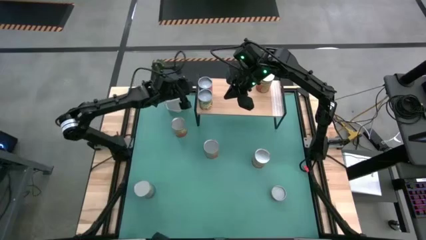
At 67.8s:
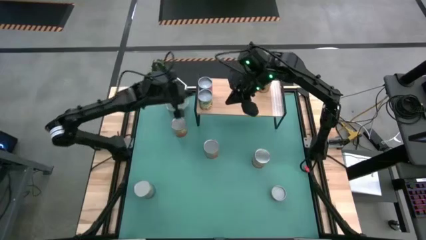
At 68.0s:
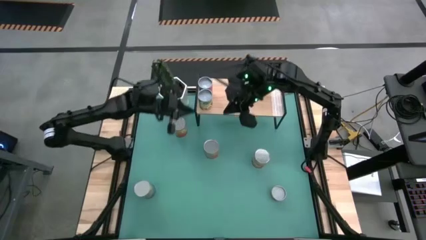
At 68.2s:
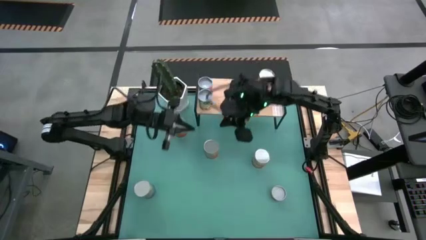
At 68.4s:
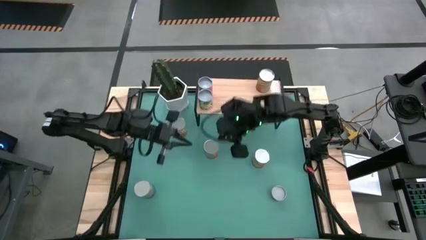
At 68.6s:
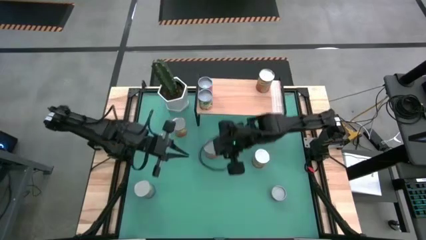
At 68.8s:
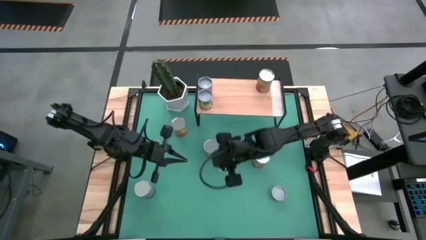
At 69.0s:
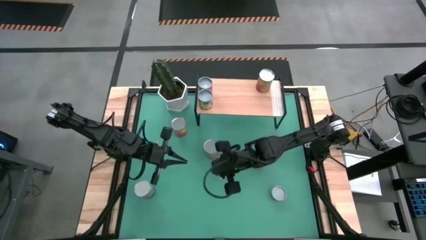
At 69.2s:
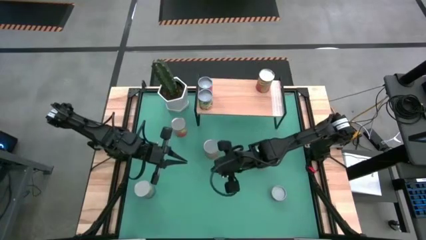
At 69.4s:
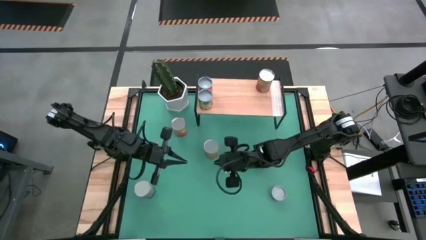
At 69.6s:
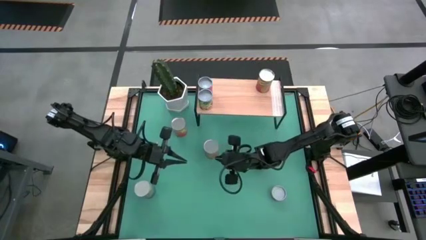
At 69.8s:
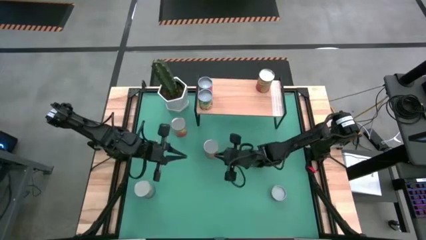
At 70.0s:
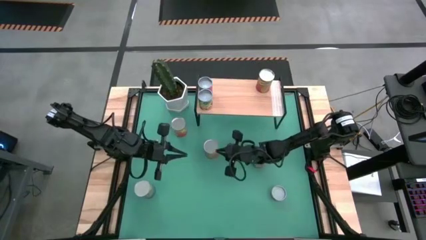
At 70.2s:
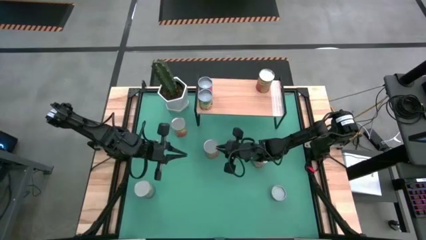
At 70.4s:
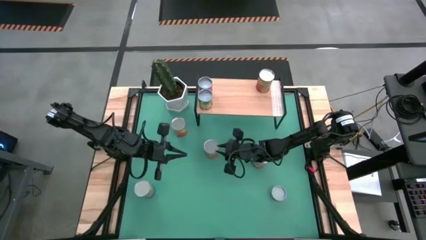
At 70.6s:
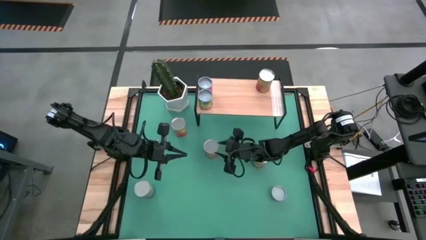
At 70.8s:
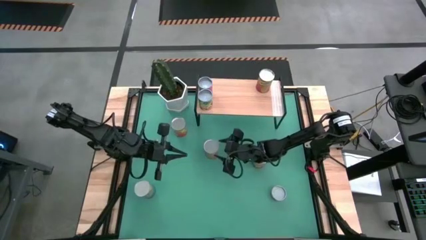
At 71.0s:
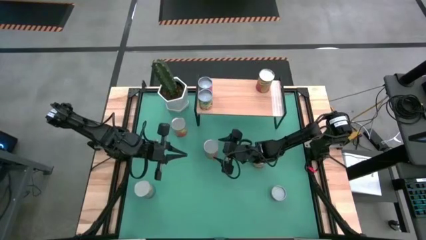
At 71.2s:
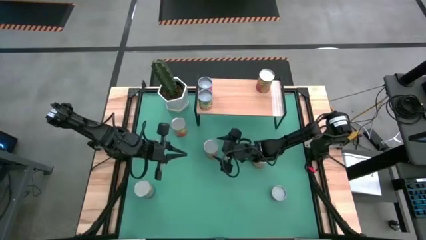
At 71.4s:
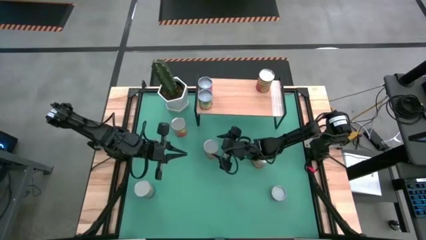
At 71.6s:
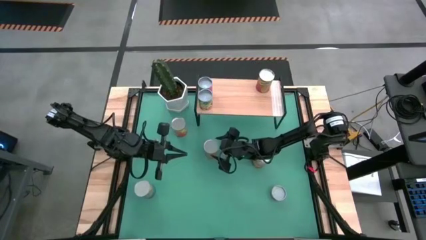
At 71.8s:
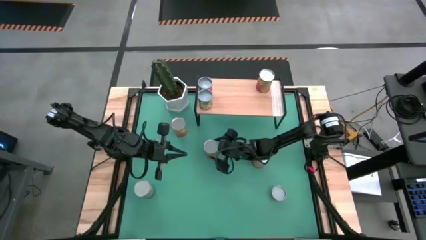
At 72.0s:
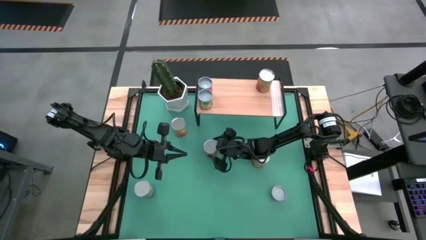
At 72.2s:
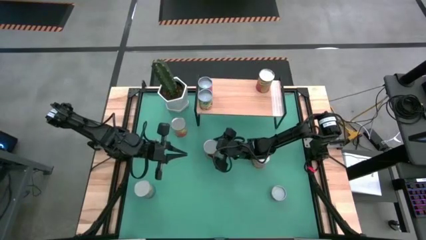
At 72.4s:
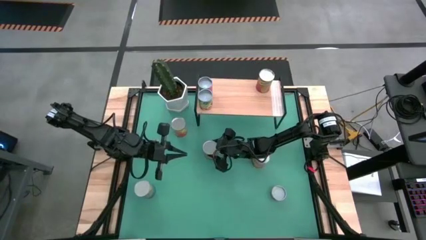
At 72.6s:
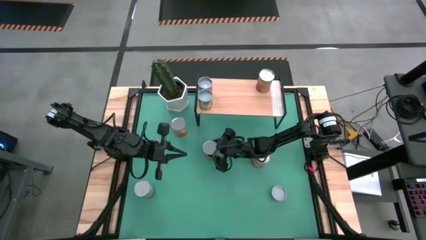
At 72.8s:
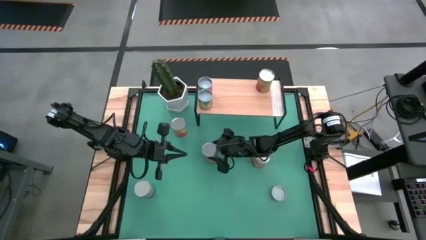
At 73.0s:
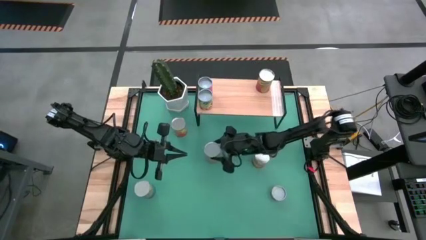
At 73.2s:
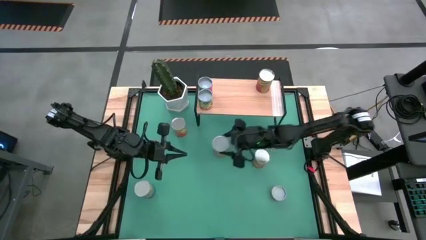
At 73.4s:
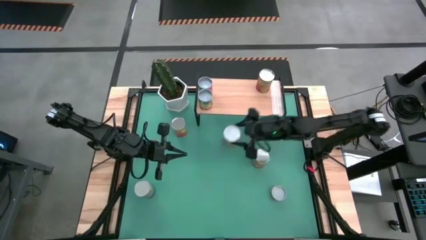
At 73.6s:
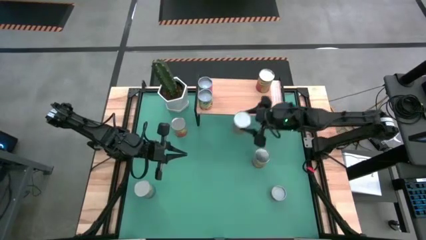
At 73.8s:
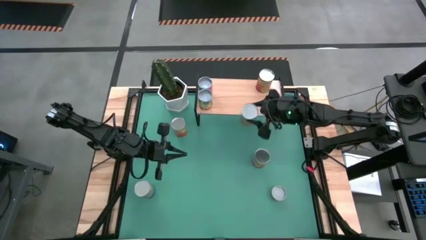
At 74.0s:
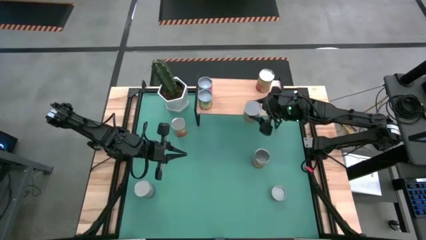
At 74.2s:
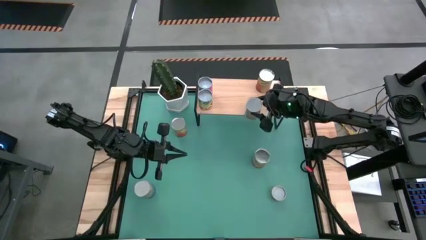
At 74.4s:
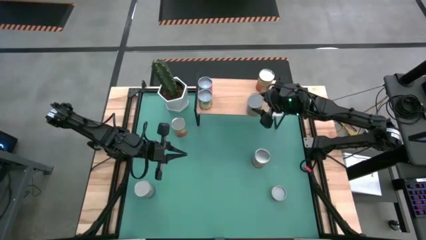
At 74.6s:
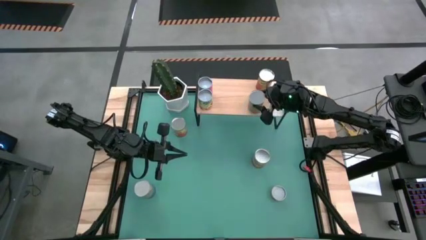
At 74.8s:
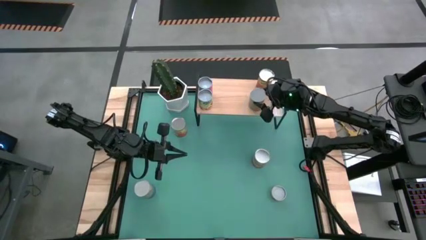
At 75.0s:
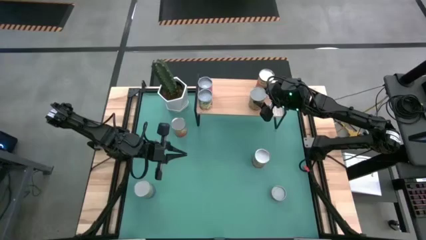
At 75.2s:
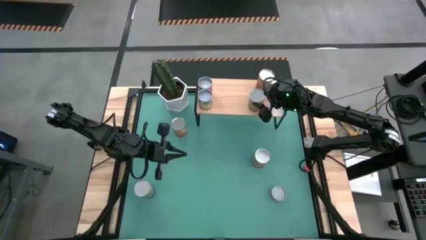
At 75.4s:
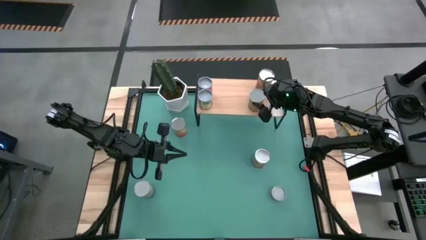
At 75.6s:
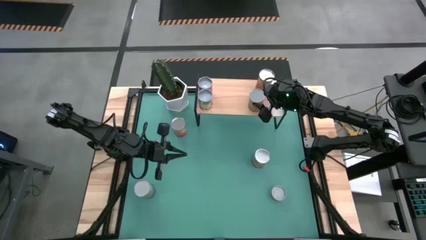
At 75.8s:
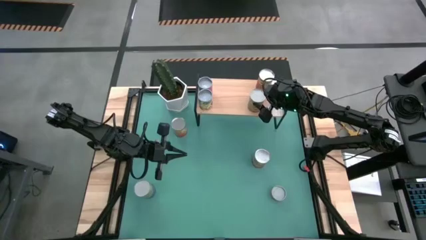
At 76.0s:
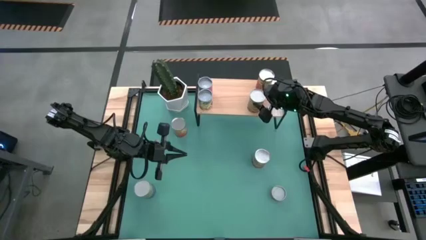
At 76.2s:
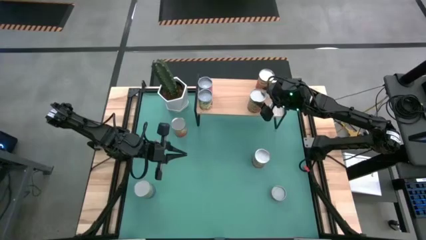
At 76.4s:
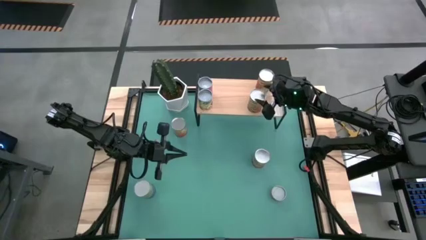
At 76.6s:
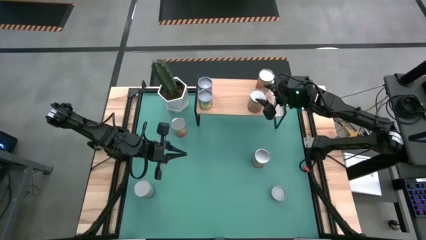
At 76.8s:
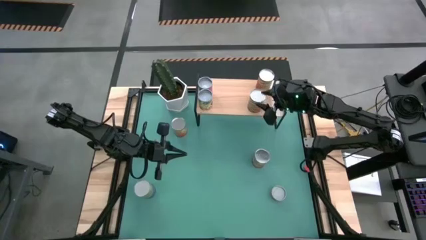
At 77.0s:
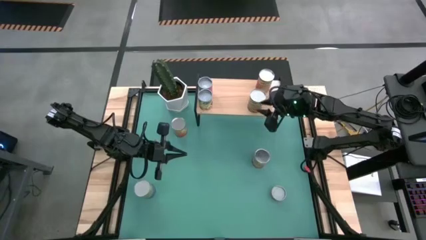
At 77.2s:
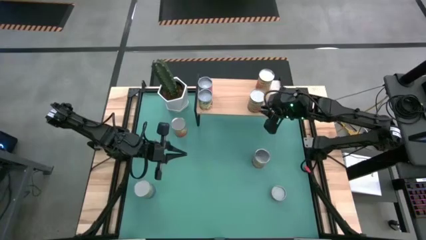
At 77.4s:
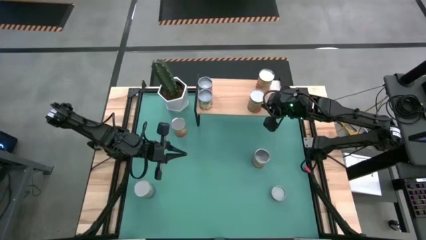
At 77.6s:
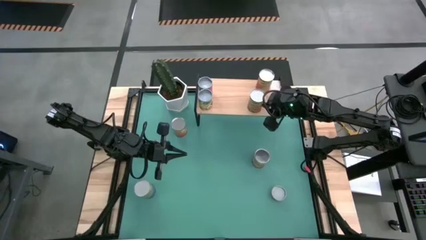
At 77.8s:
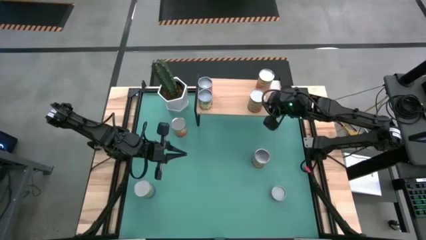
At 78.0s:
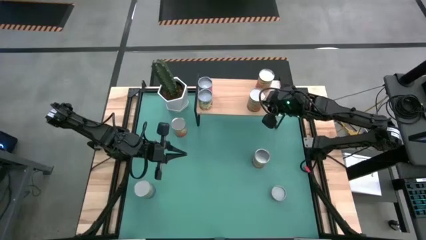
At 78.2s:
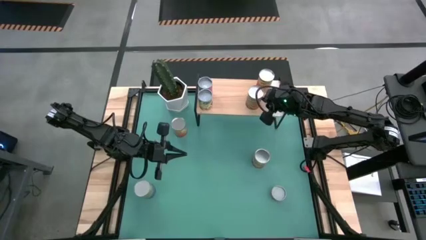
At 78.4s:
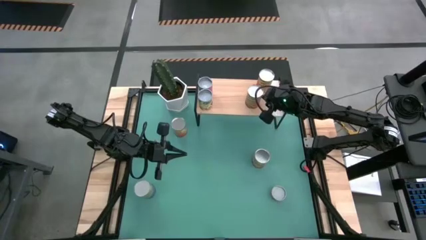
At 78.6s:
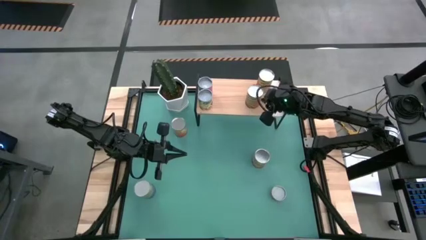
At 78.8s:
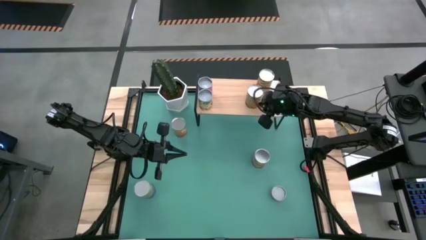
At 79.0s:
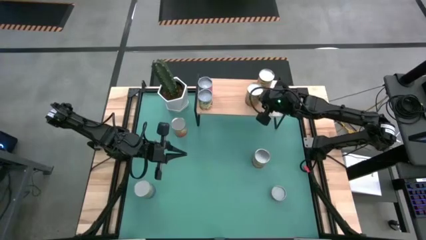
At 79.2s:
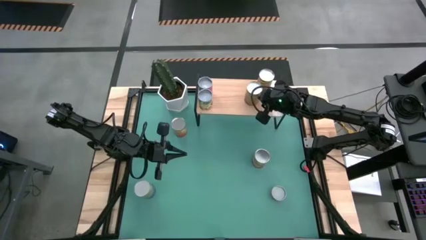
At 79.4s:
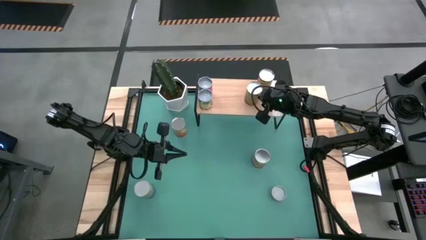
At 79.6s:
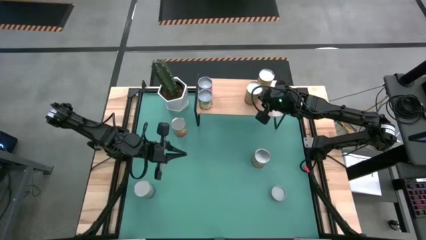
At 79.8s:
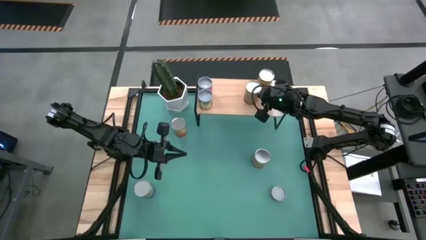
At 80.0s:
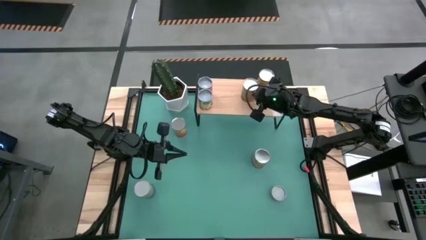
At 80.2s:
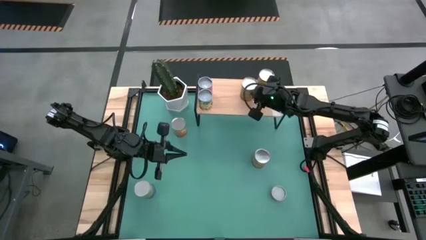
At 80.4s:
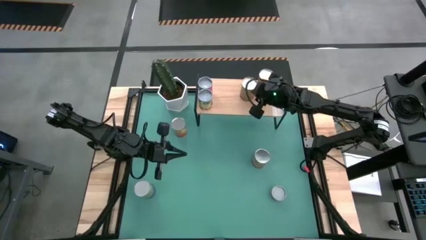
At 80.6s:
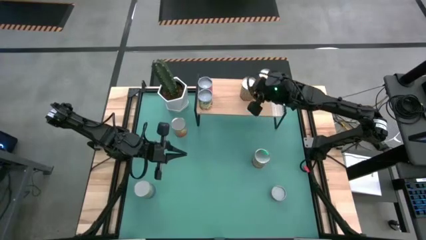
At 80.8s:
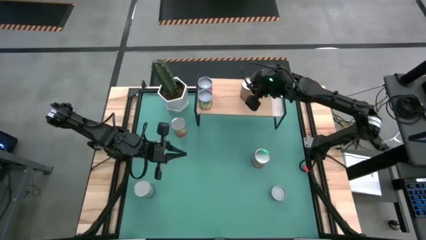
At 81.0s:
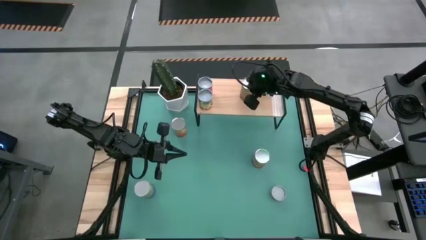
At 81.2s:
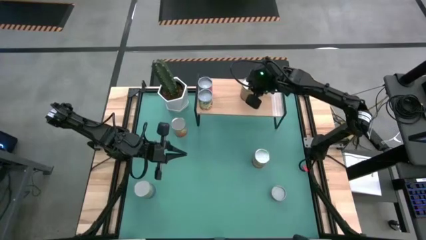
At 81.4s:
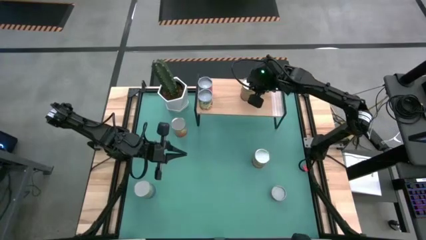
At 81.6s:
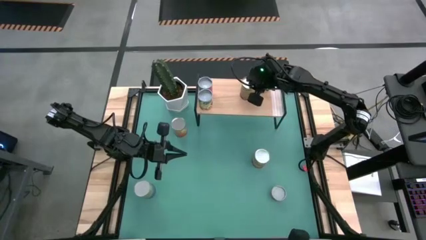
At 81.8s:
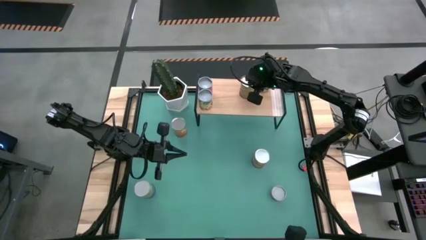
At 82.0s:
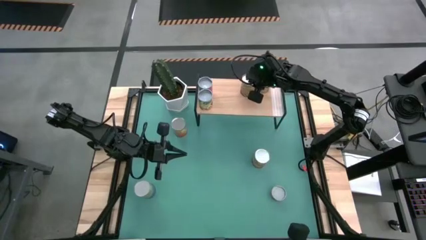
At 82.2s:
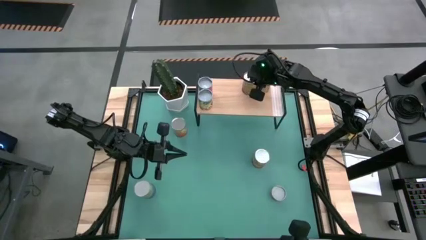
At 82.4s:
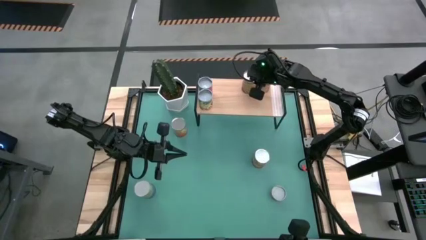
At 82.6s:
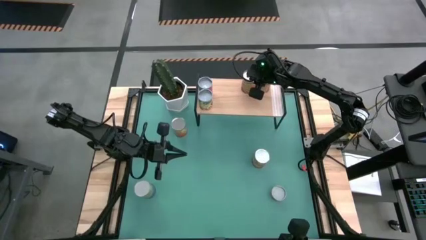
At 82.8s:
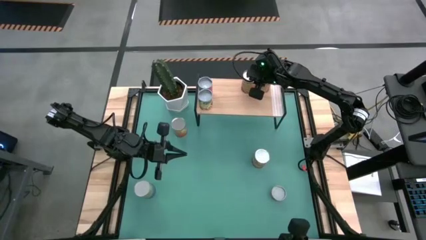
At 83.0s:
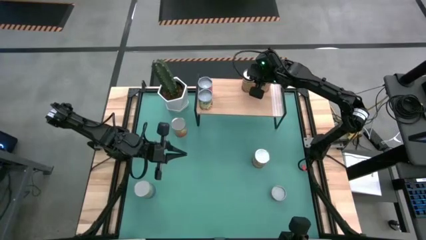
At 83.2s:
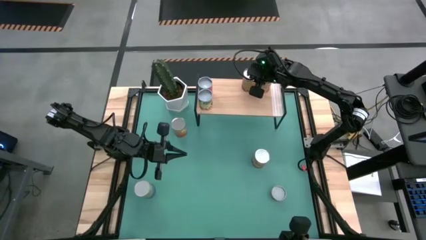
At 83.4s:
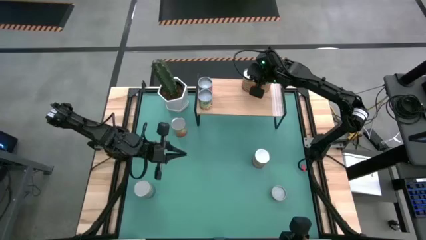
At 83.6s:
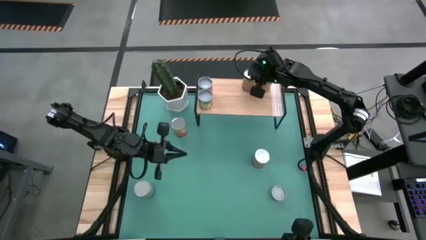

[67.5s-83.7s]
Task: Pick and place cans onto a shelf
Put the canned beans on the shelf
